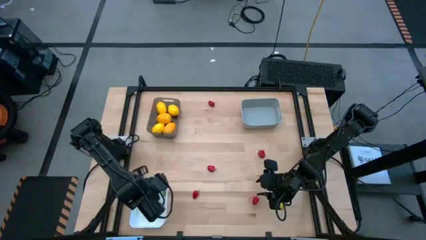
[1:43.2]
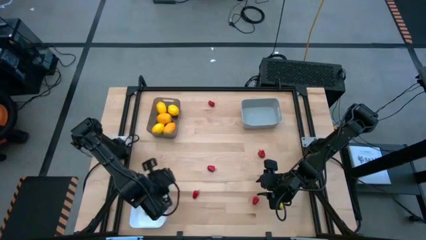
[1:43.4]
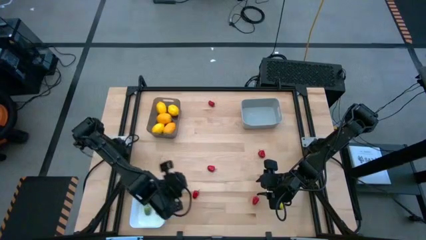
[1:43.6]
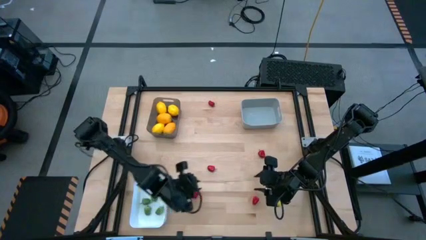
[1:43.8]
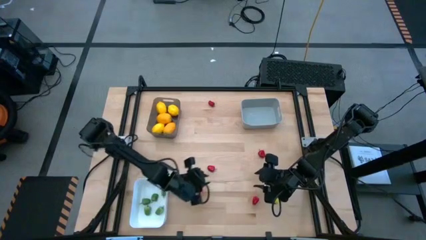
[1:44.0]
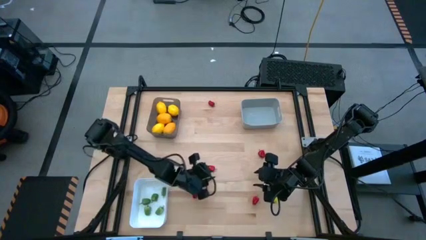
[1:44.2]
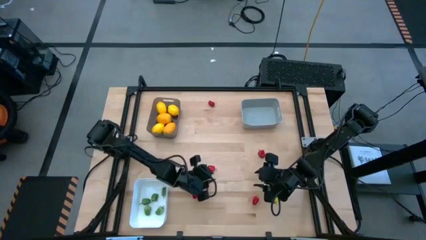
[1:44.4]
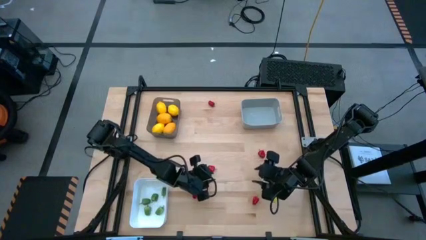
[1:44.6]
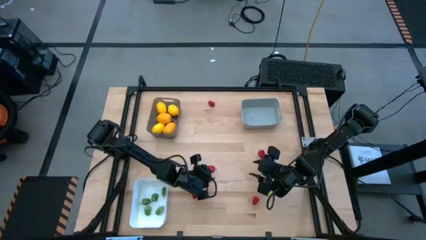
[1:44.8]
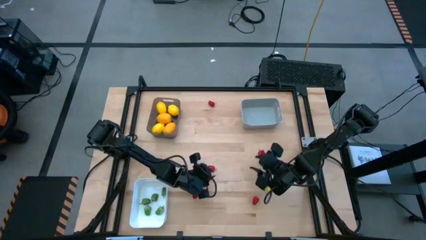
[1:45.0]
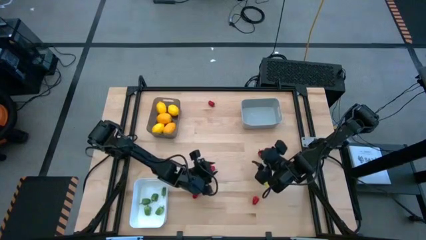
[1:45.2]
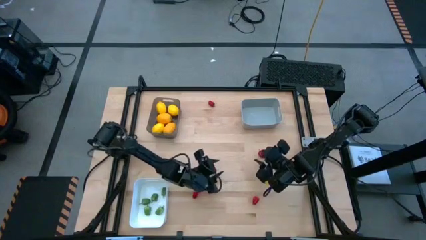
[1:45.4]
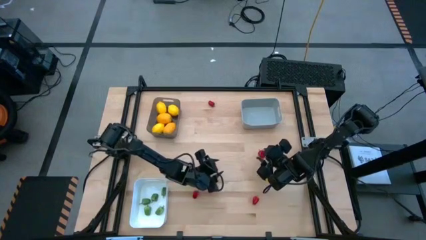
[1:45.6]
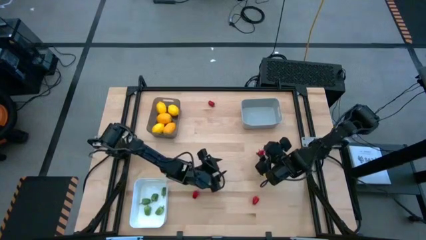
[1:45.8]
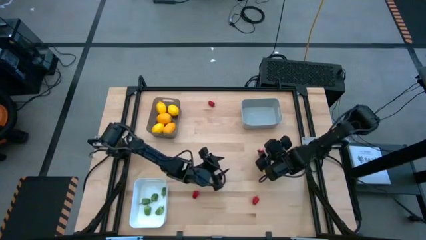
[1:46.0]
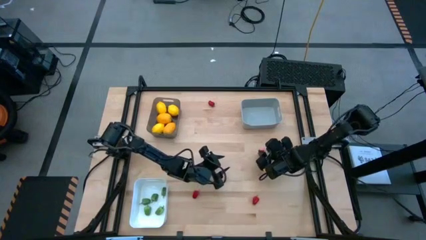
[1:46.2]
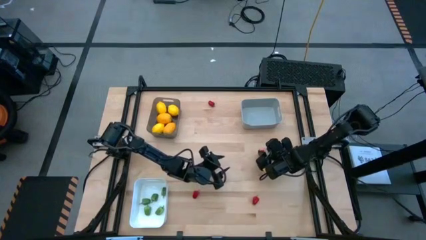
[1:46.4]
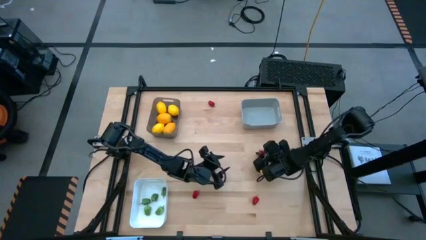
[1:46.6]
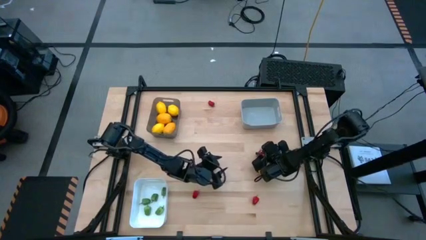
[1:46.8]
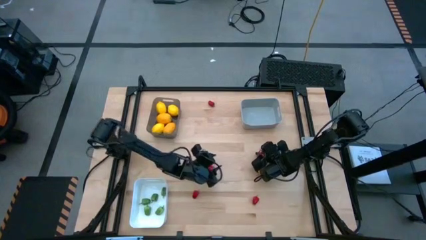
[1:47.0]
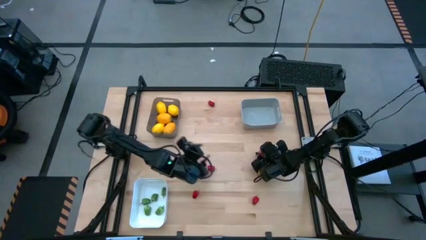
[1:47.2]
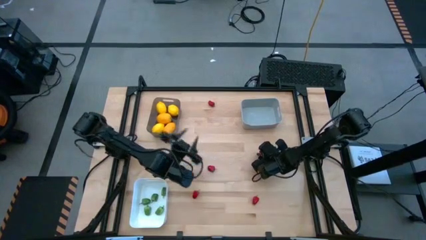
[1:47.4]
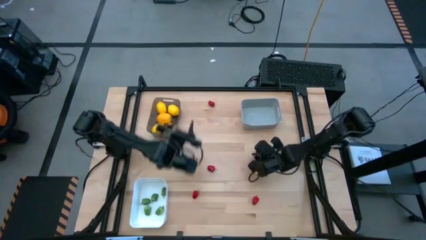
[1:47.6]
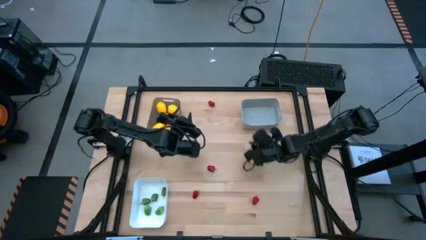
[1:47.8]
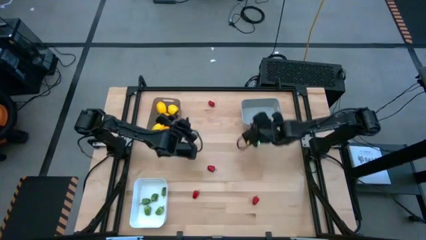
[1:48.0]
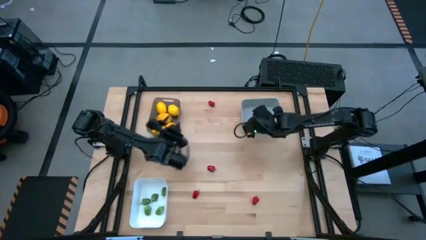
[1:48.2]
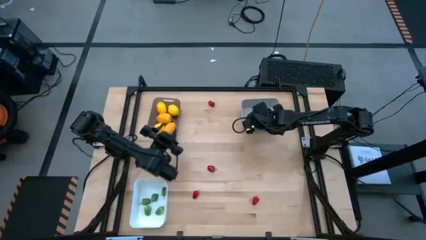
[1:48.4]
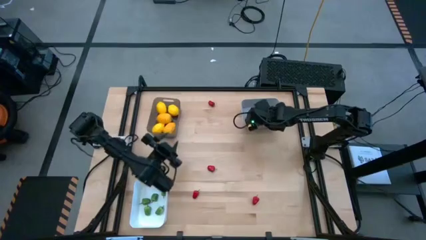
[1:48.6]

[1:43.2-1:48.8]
Task: Sort produce into baskets
Put the red bell pepper into the gray bin

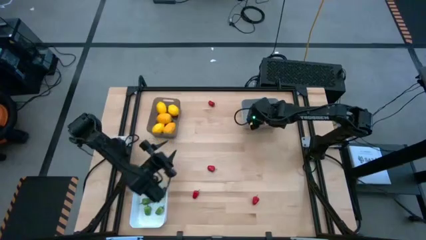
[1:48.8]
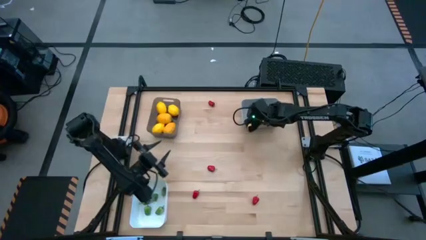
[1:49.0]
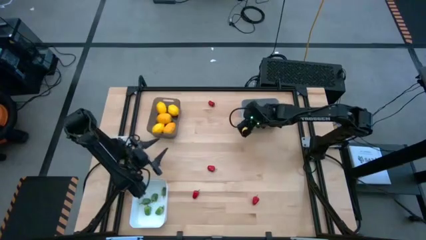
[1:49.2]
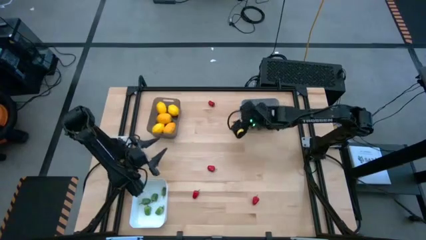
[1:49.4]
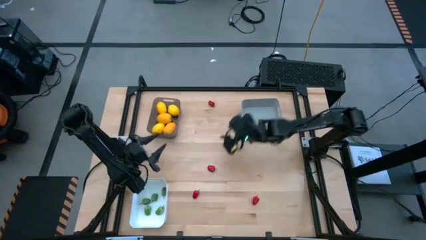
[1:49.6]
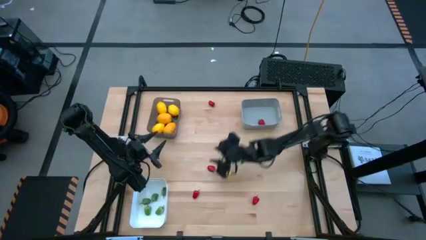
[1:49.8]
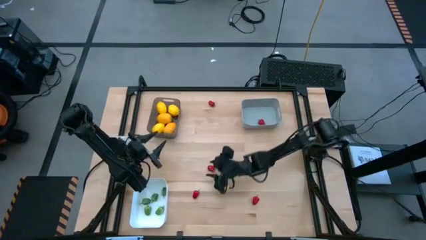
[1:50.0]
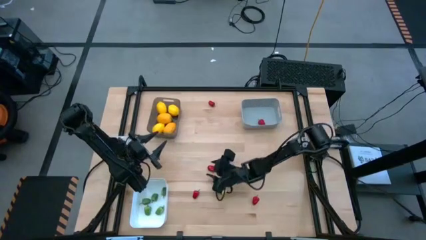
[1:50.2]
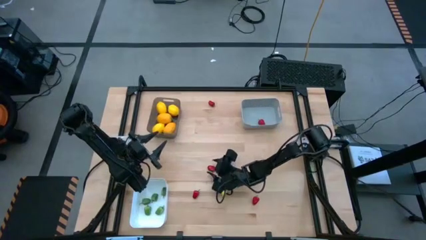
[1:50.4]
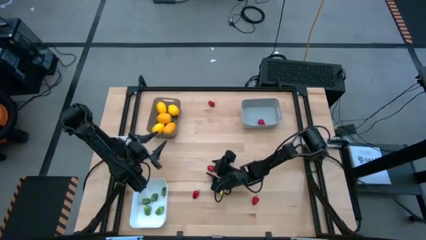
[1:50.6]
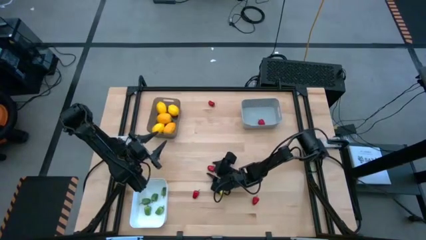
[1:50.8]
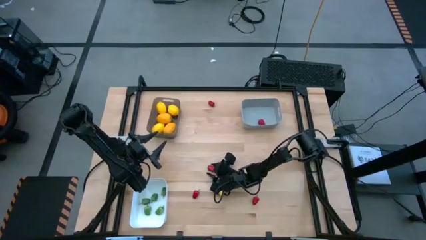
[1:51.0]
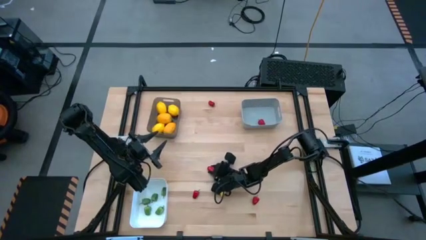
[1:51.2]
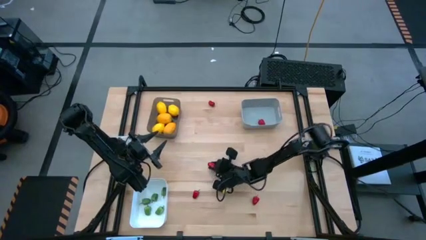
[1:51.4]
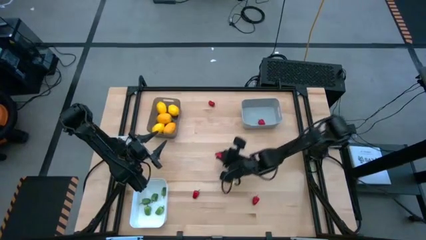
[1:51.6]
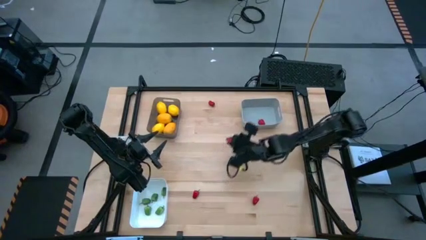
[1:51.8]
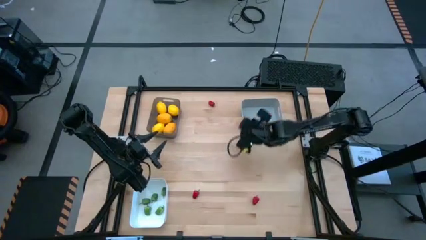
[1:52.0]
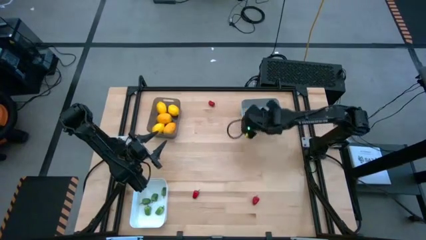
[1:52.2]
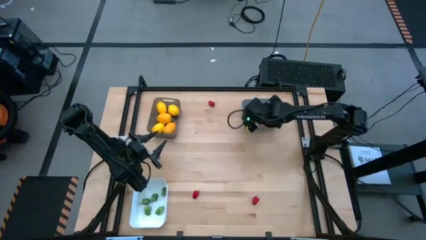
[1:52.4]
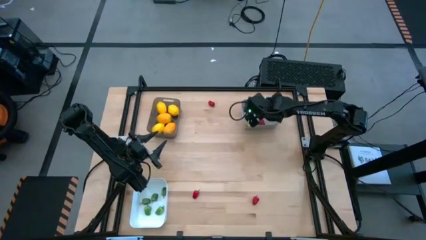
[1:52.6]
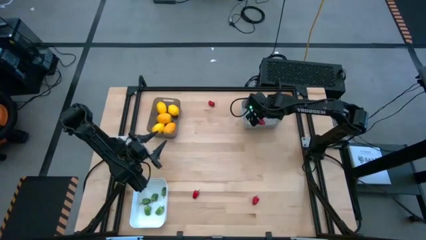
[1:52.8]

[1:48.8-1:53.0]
Put the red bell pepper into the gray bin

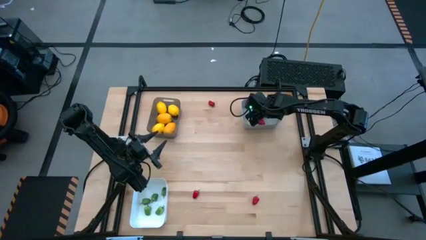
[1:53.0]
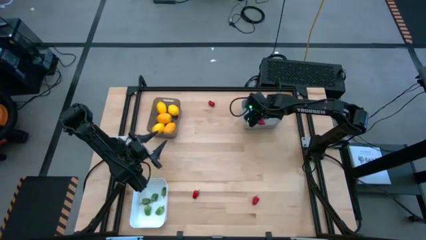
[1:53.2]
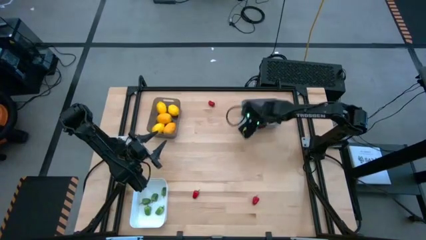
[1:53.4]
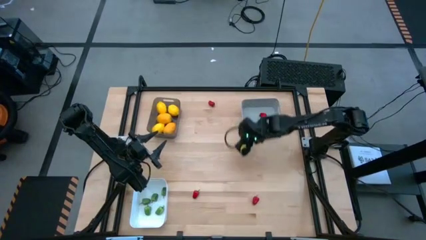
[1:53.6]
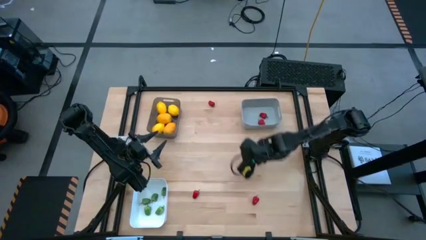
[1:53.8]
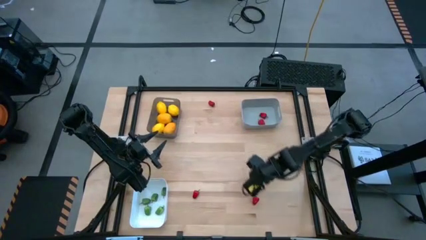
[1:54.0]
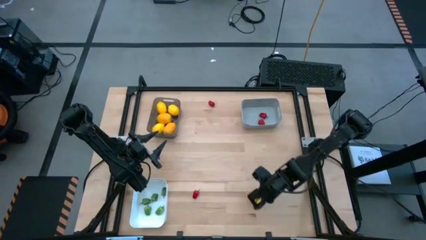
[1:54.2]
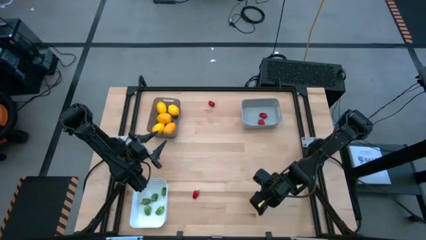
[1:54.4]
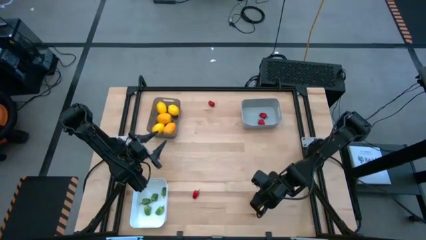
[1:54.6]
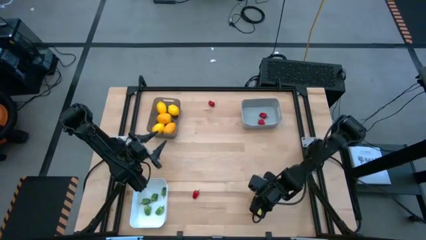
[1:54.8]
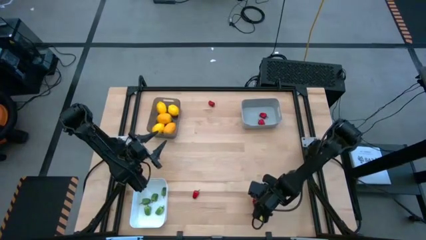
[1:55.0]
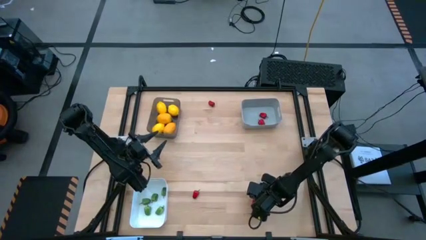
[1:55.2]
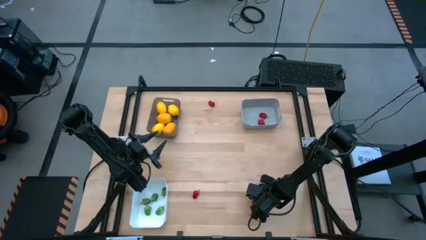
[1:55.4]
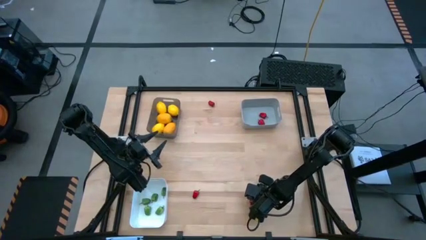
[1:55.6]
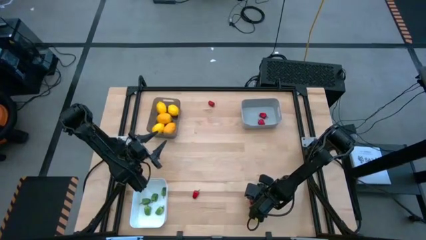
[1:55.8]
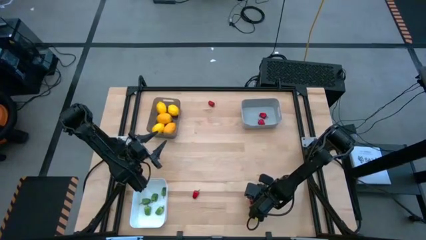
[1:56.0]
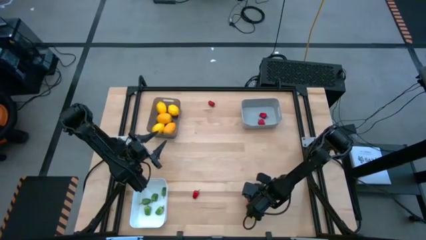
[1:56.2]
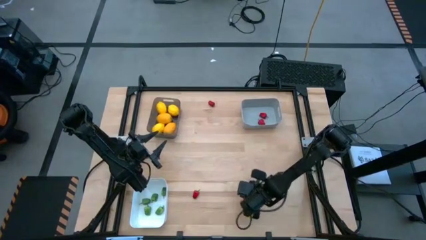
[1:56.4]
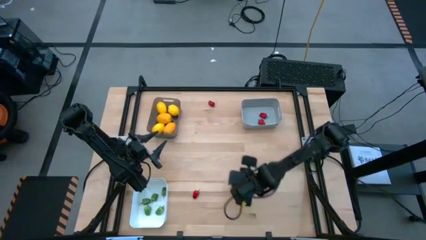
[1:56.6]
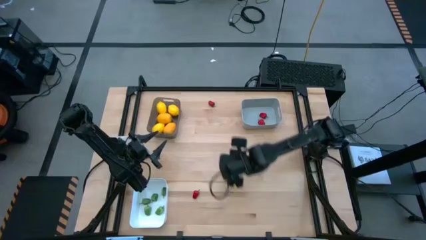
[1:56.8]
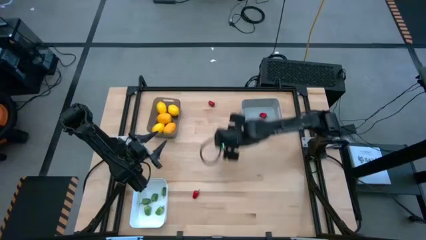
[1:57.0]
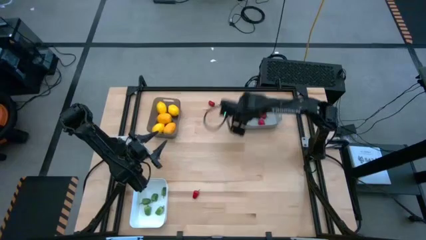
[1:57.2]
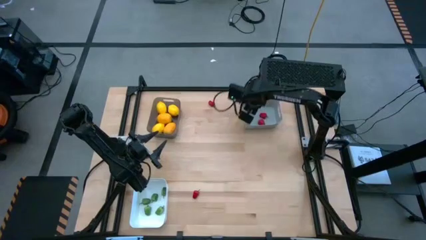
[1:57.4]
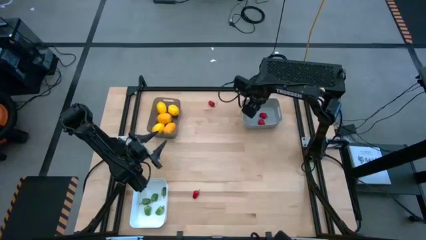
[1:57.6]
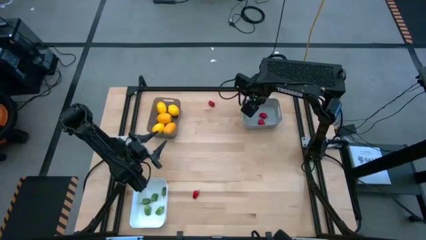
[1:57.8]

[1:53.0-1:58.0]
Put the red bell pepper into the gray bin
